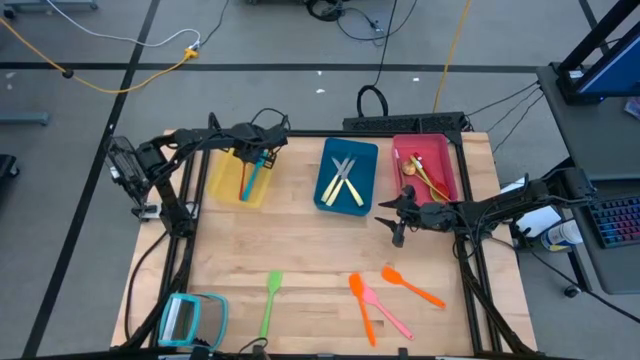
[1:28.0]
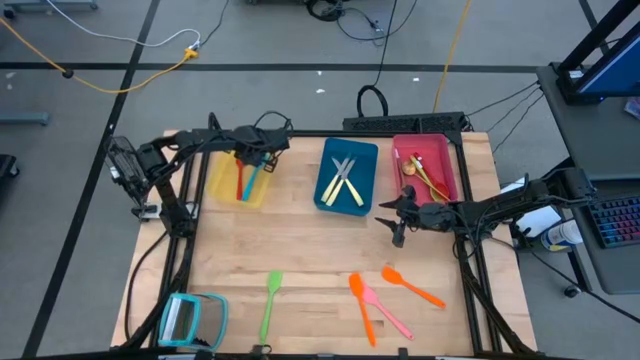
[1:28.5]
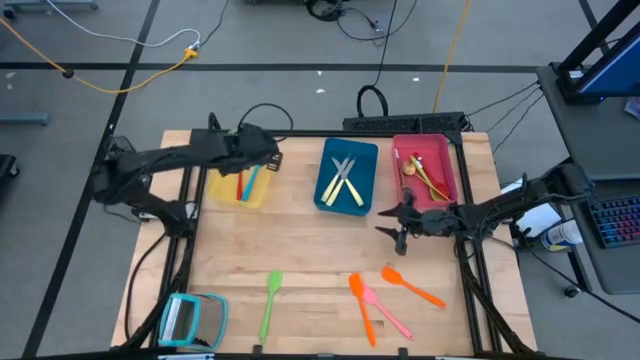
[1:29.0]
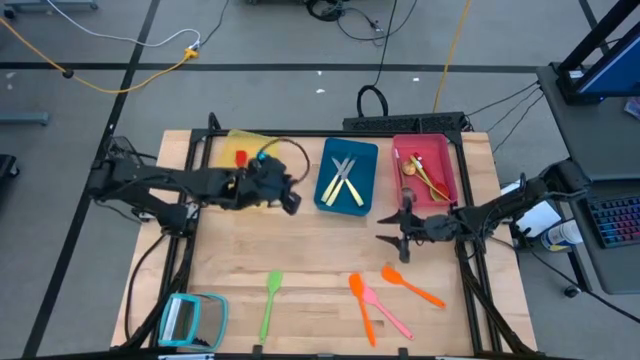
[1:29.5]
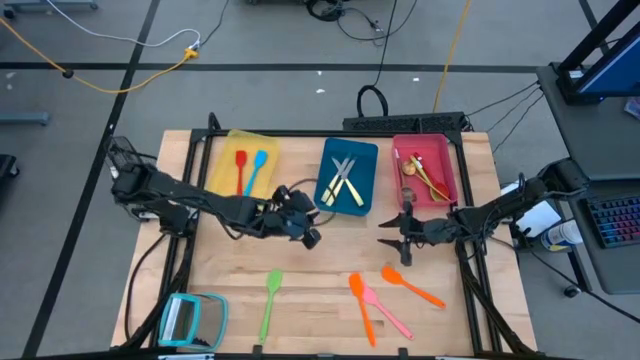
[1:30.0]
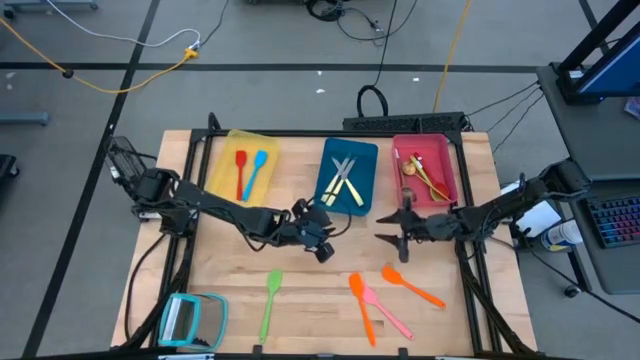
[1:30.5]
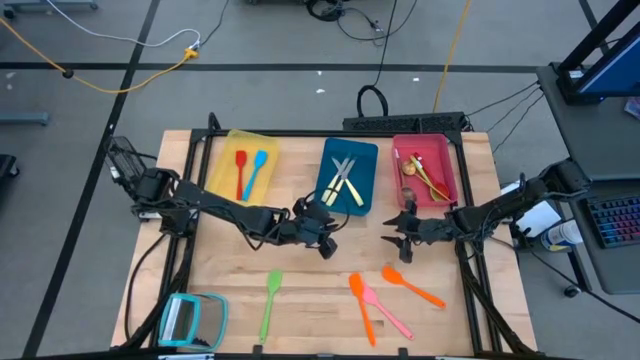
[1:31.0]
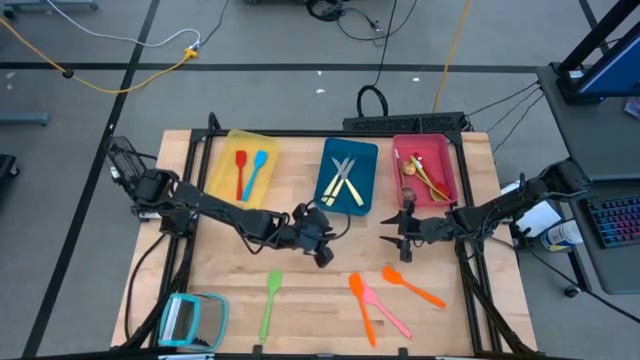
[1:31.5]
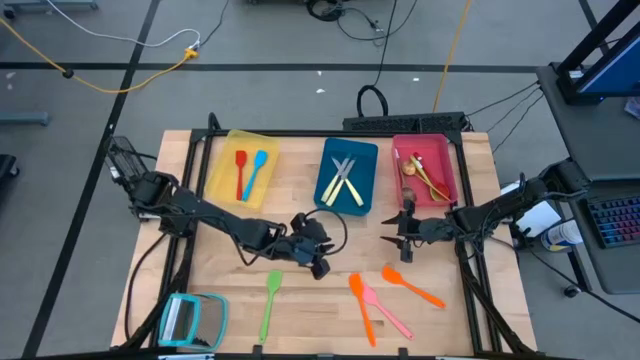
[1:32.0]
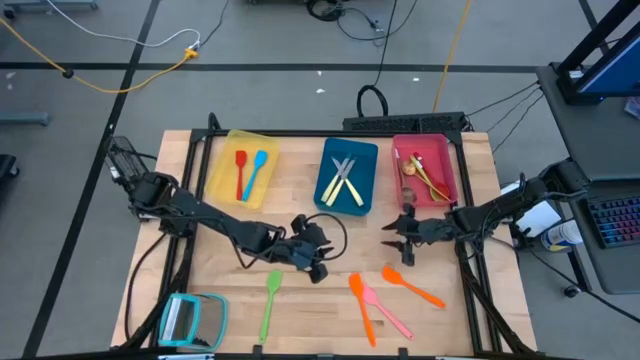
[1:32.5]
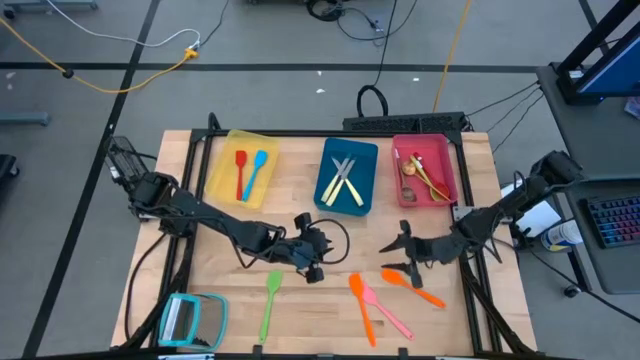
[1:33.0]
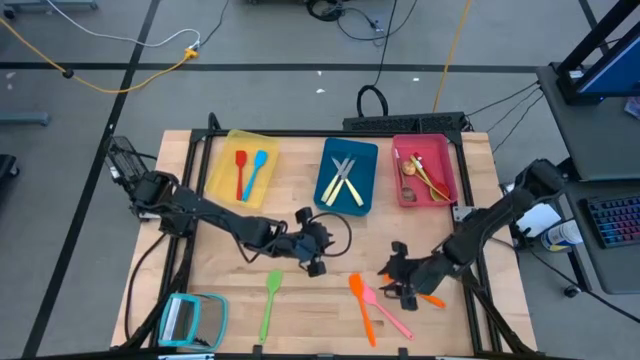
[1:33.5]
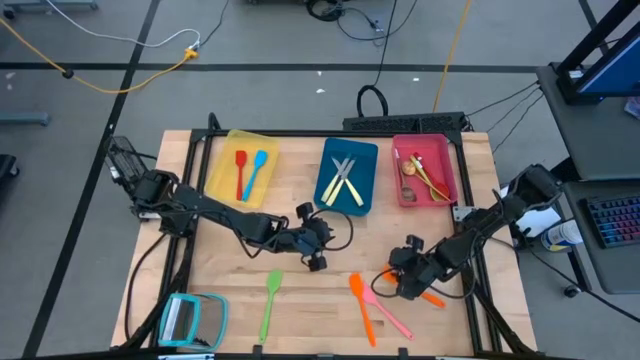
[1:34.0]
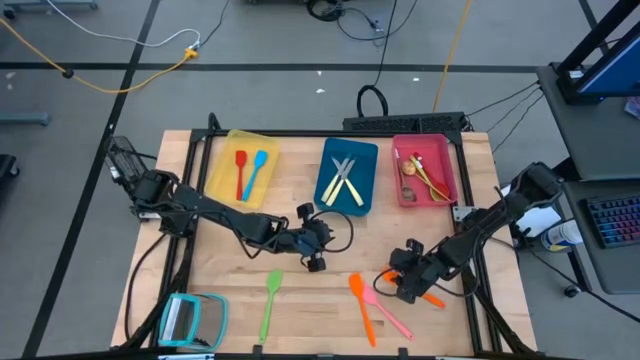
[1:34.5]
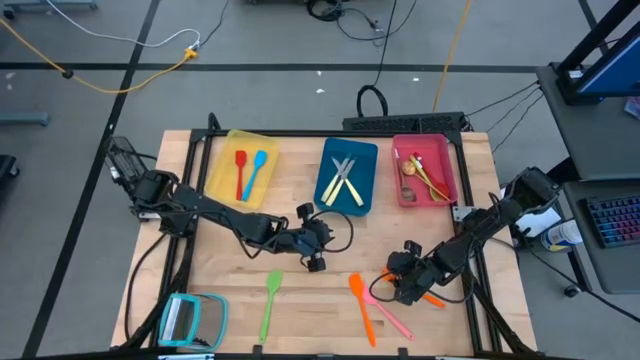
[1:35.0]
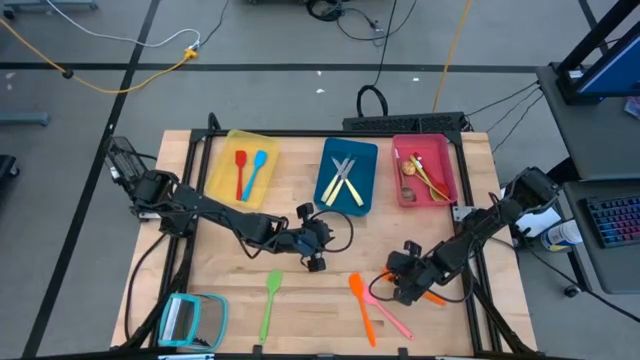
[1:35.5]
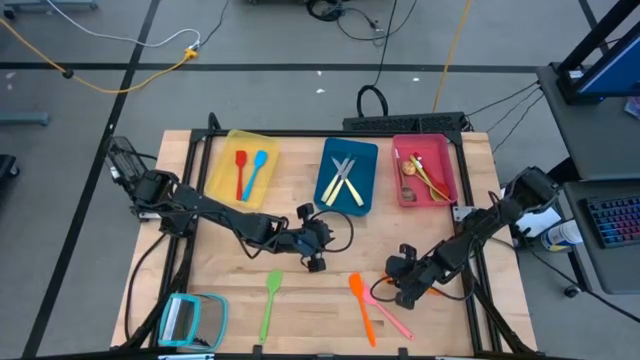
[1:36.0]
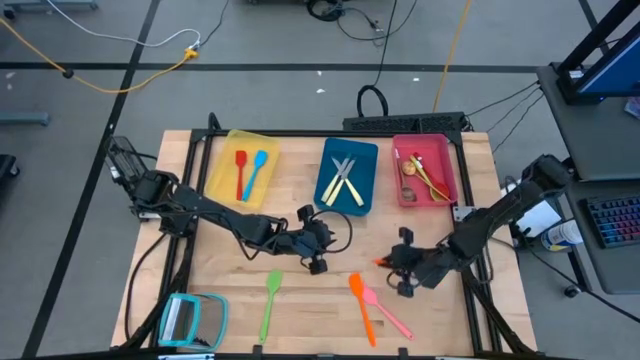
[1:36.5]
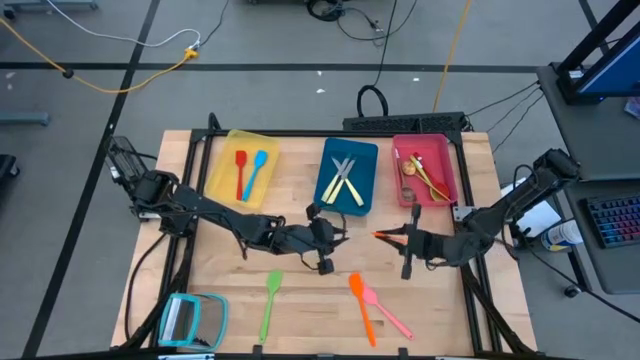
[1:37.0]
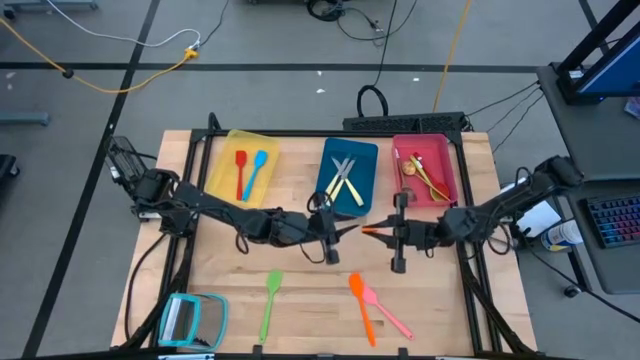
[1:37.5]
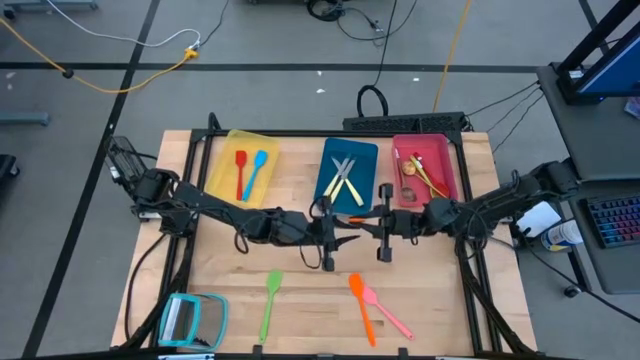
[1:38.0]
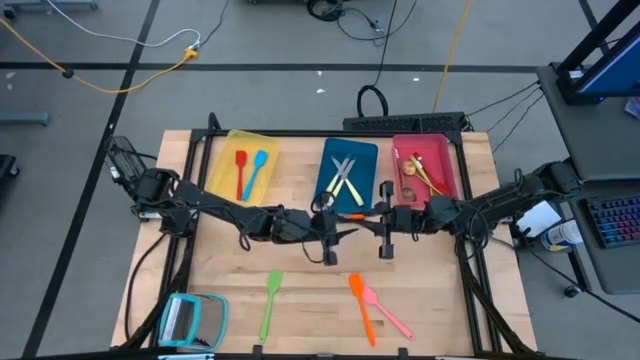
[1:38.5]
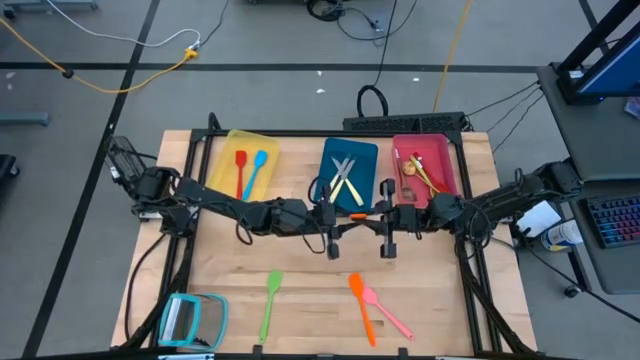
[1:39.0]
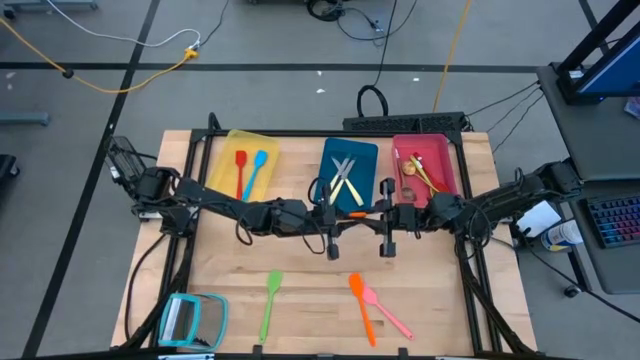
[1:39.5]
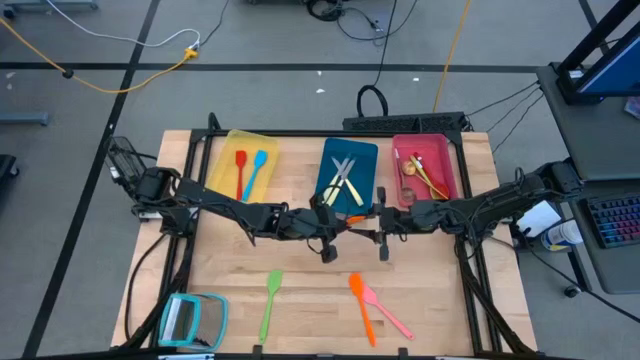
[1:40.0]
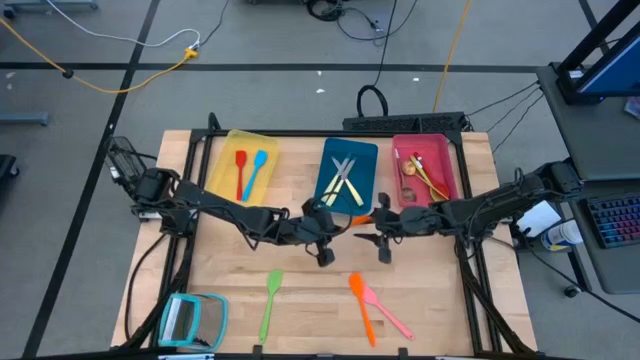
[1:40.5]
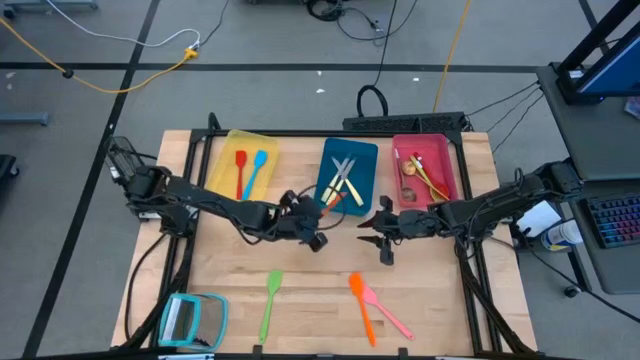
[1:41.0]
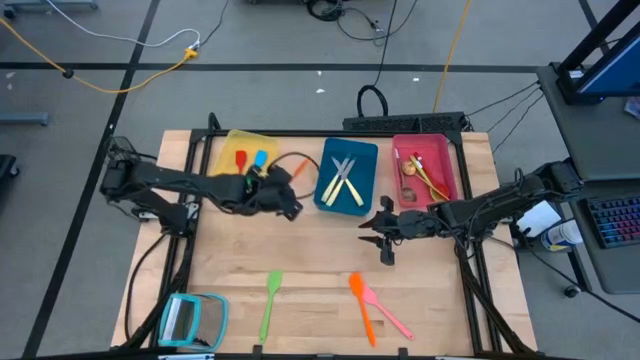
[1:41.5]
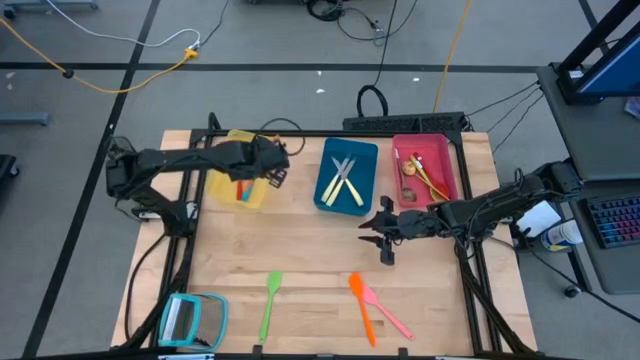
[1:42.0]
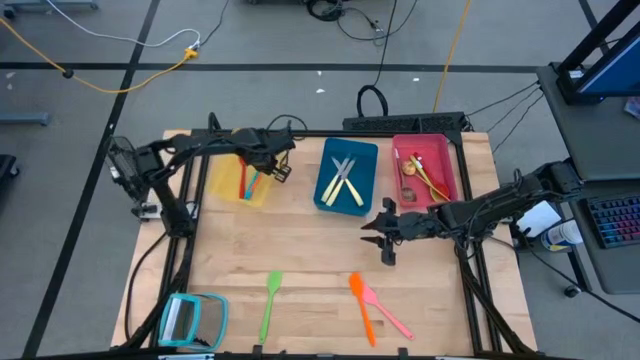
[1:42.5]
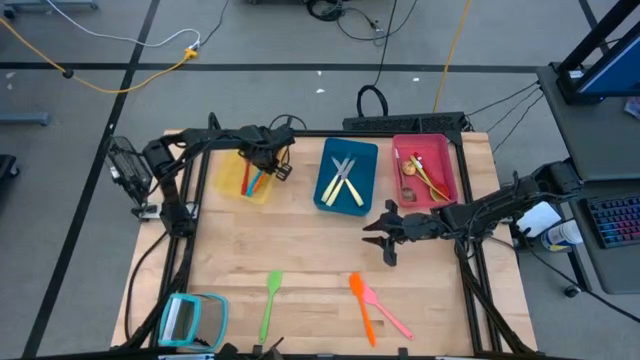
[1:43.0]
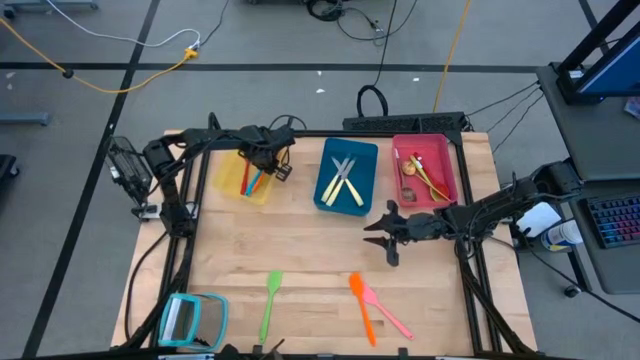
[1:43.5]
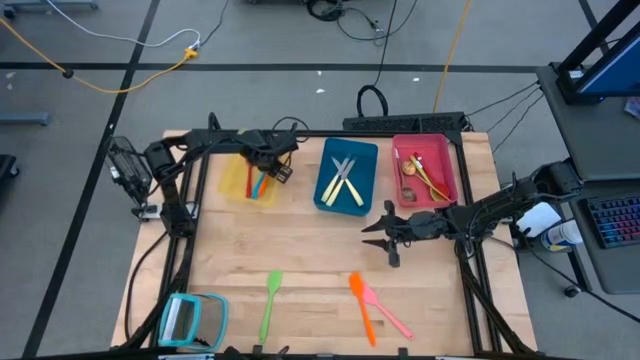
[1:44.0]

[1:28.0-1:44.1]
Task: Pick & Place Kitchen Items
Put the right orange spatula into the yellow bin

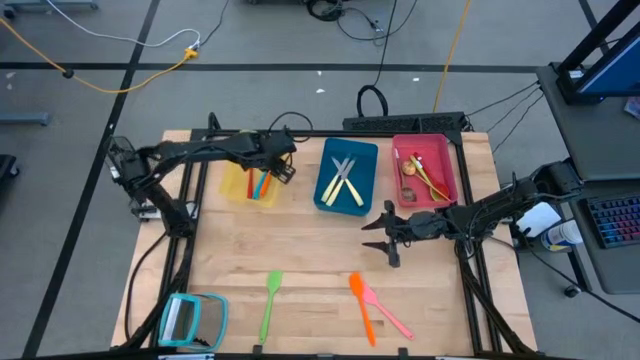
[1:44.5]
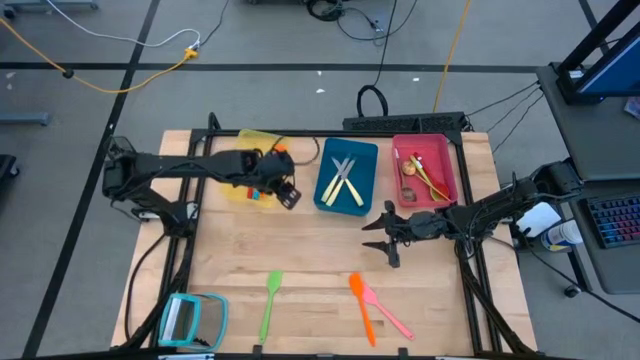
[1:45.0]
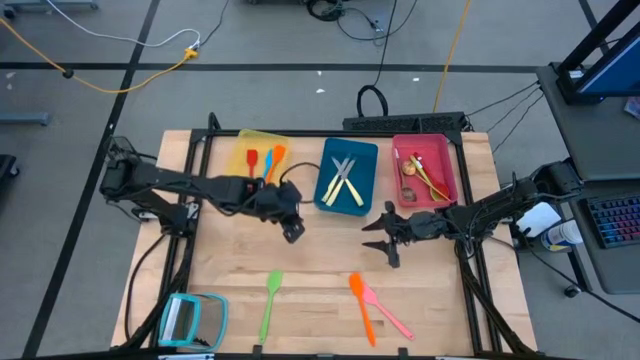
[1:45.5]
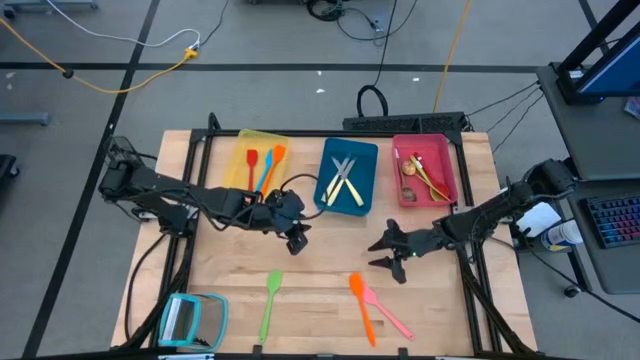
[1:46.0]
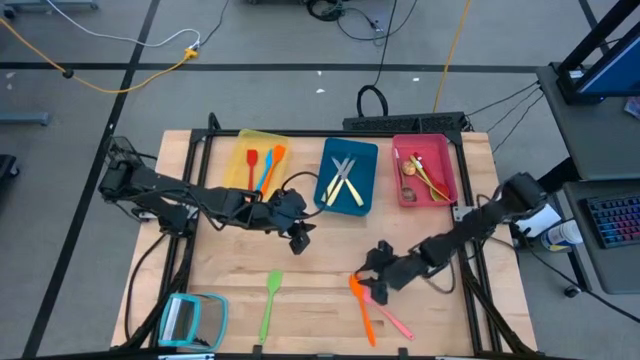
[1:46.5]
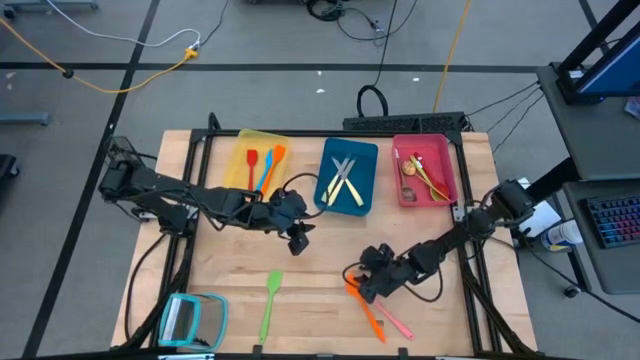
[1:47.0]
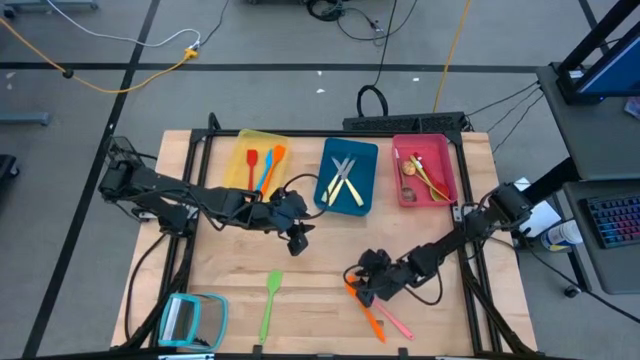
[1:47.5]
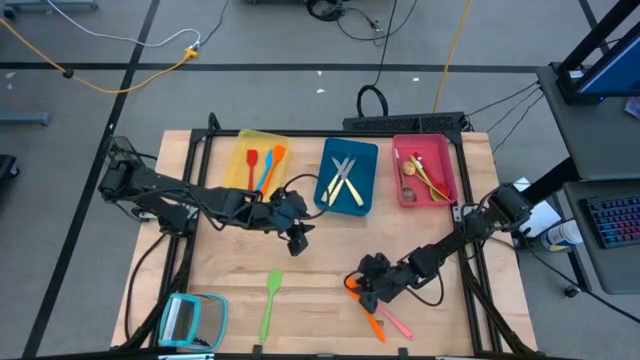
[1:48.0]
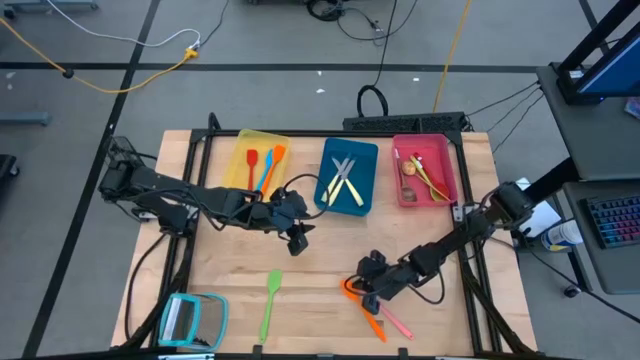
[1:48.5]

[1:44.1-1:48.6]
Put the orange spatula into the yellow bin
